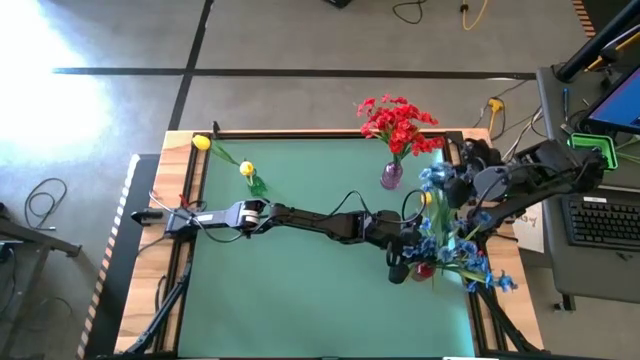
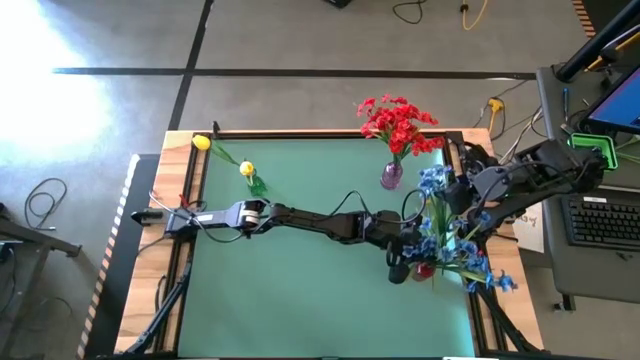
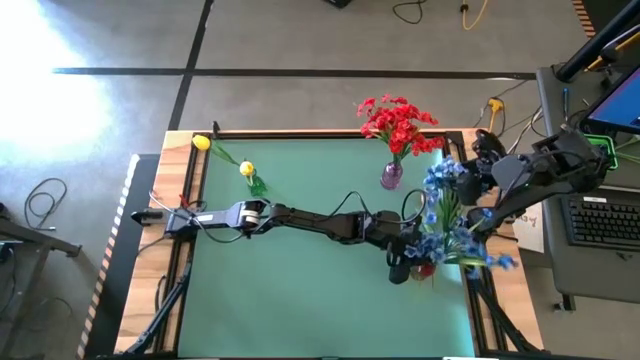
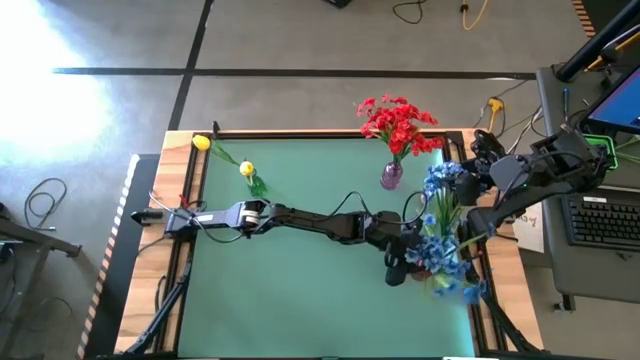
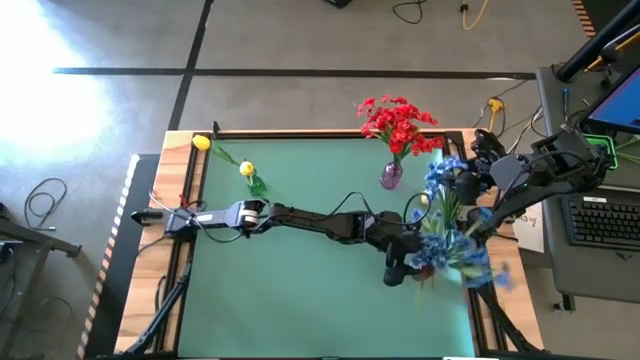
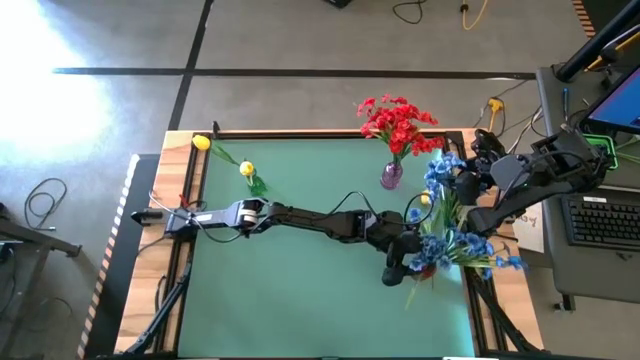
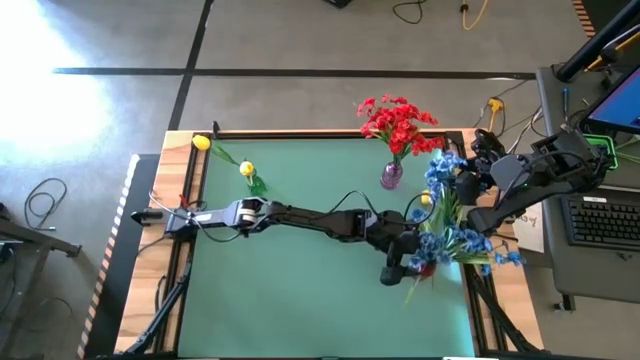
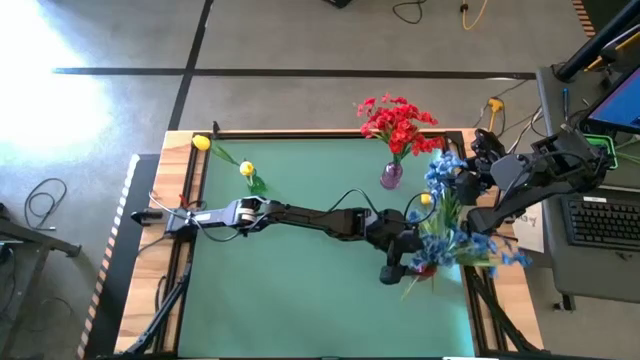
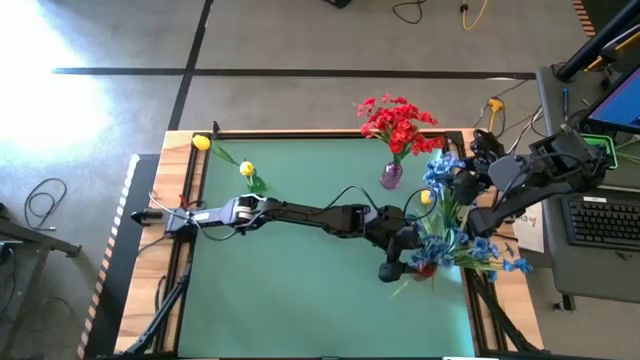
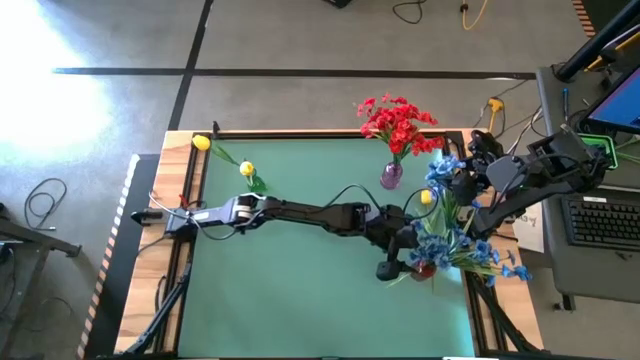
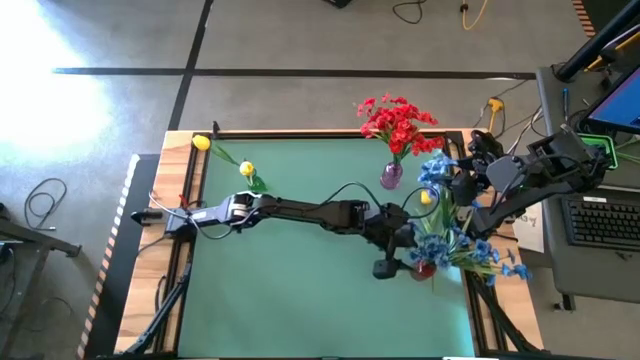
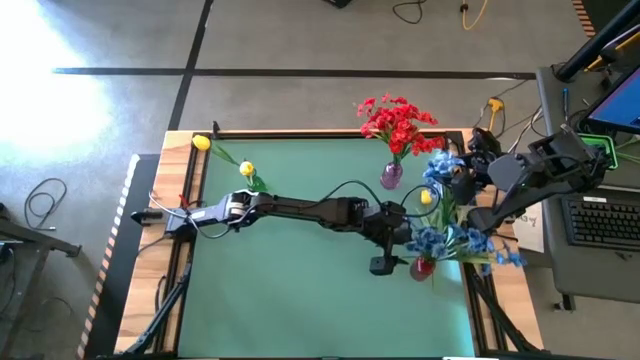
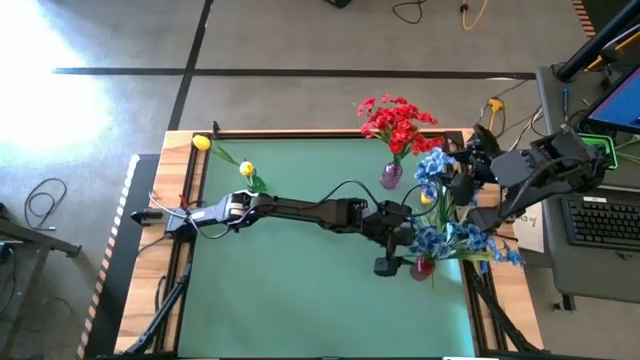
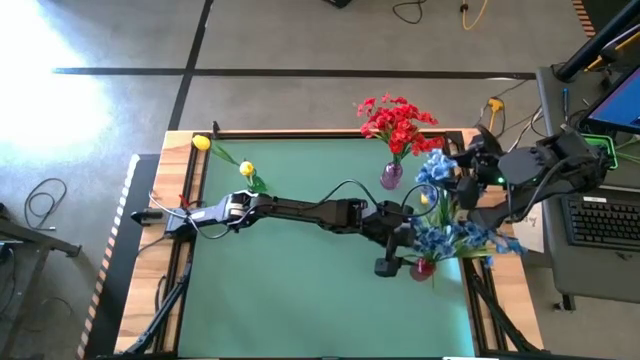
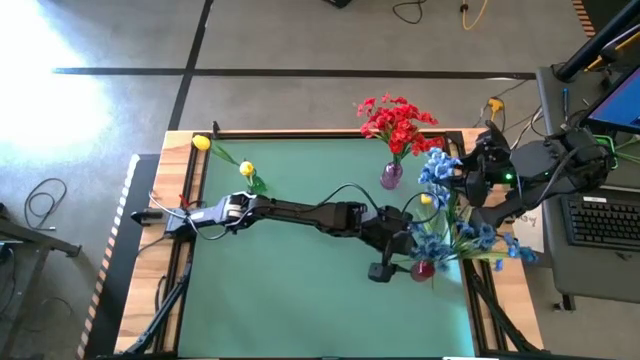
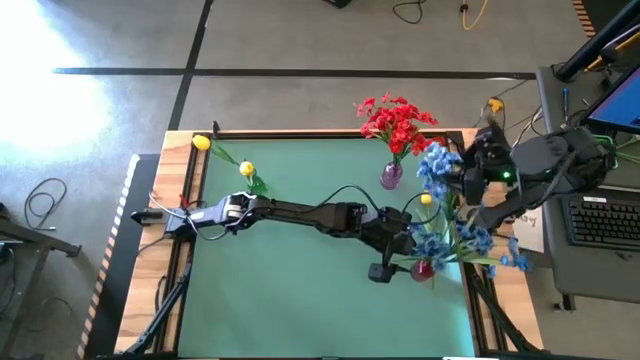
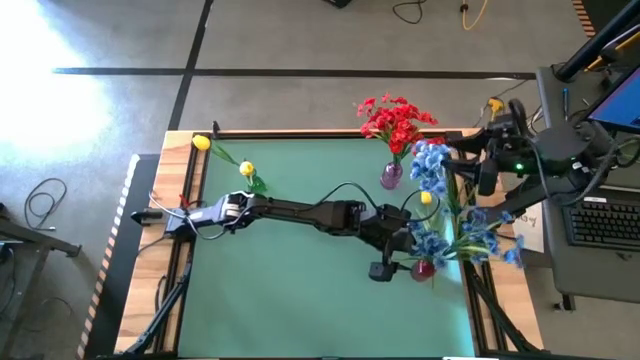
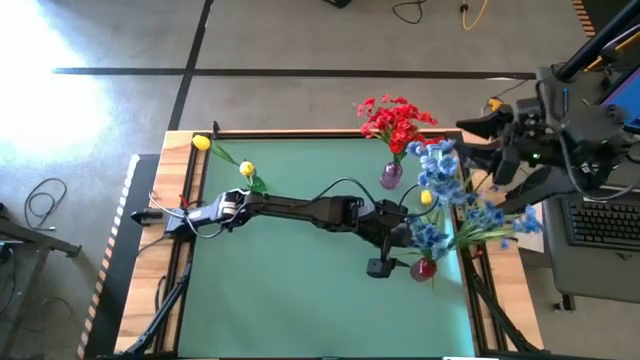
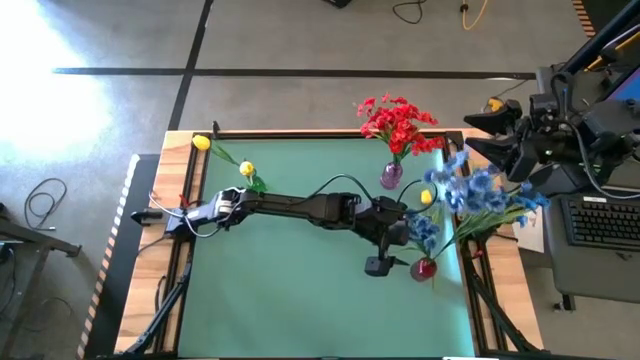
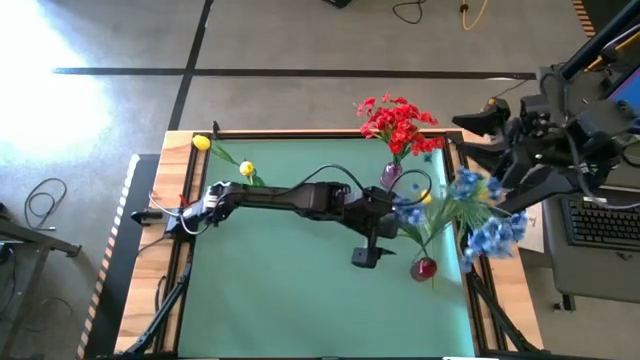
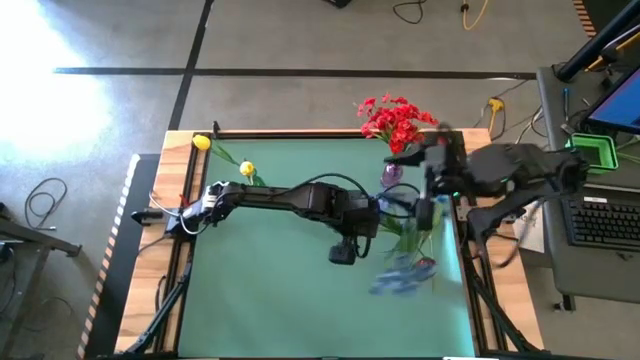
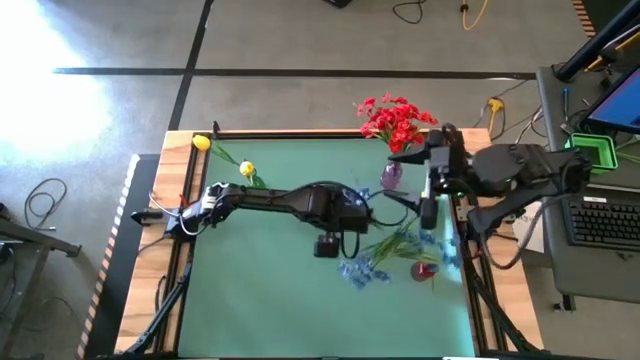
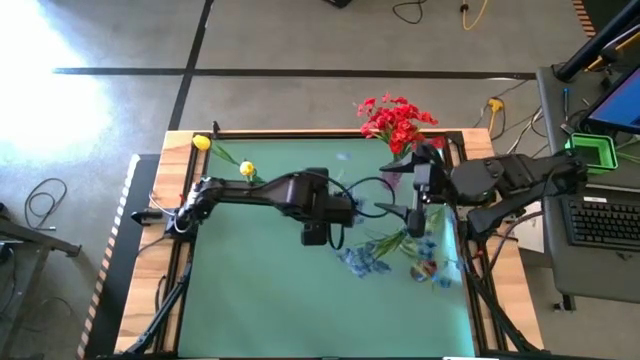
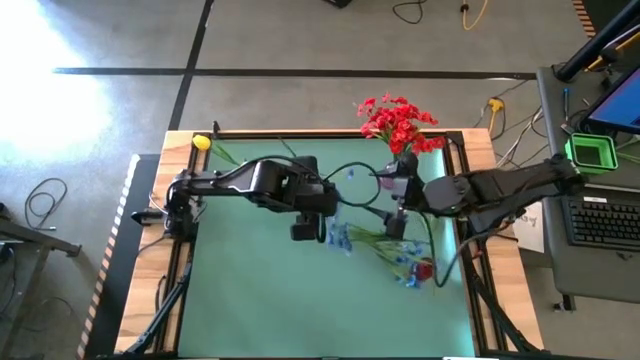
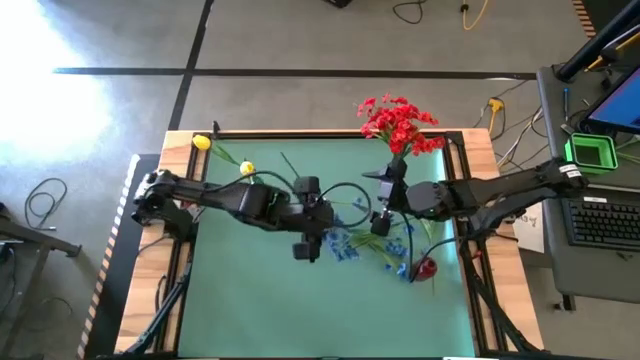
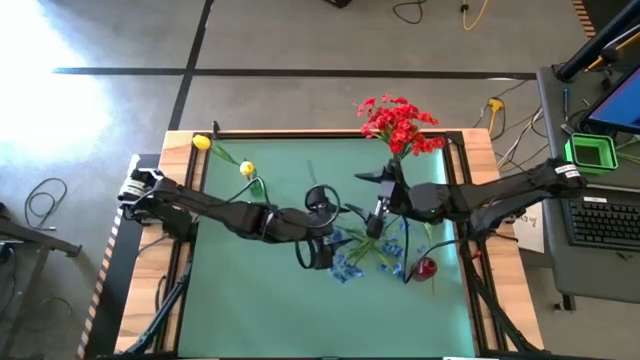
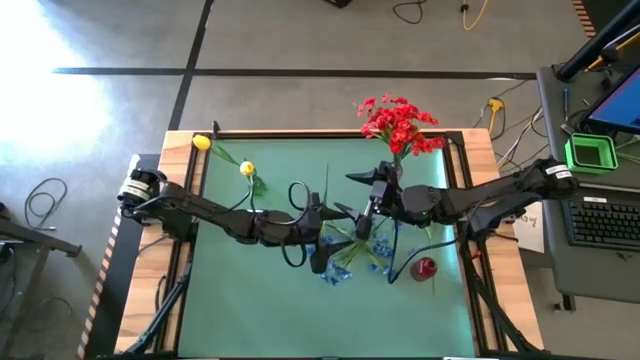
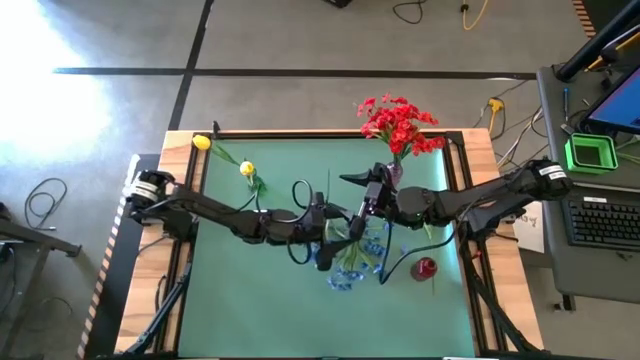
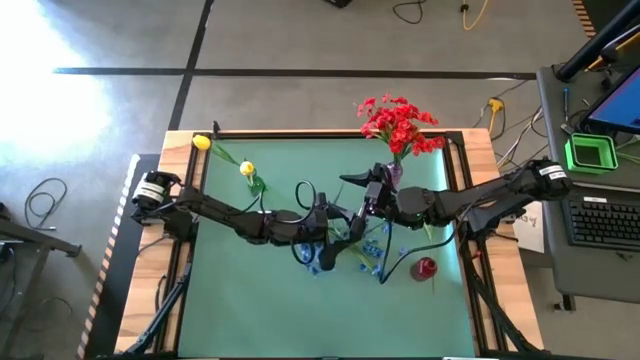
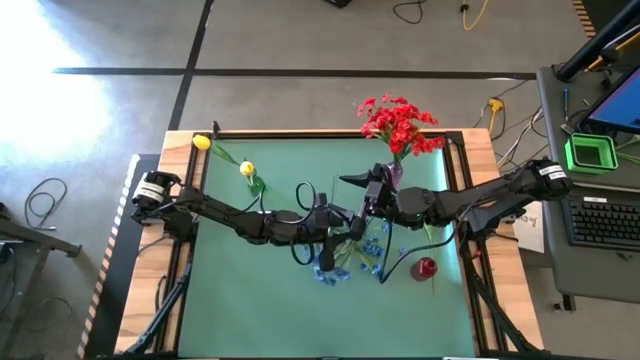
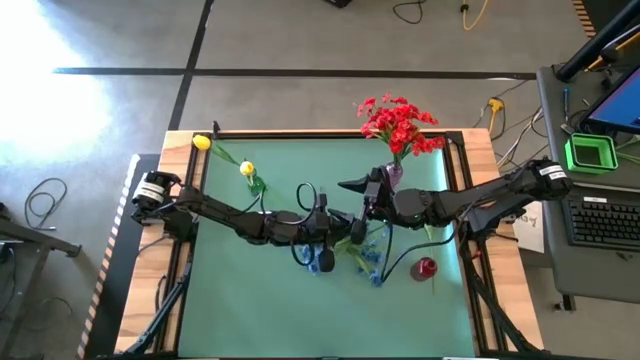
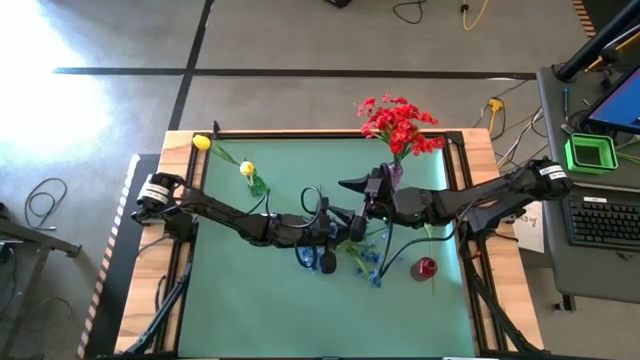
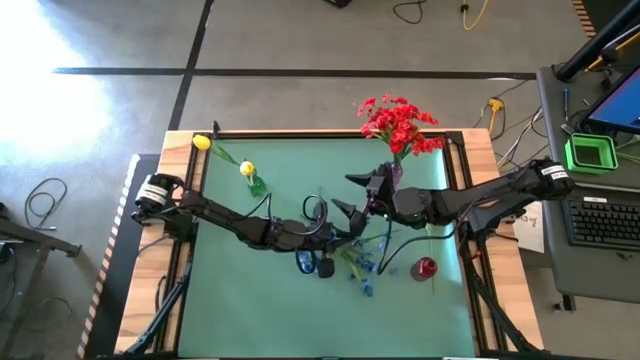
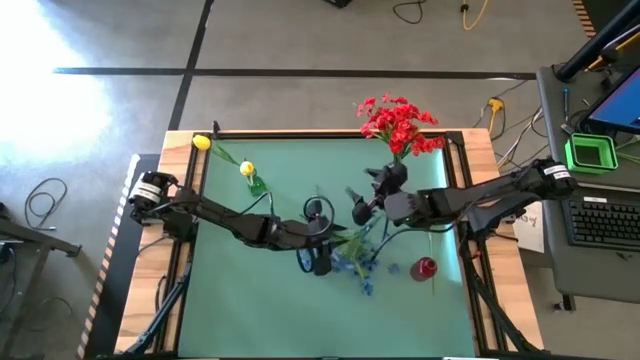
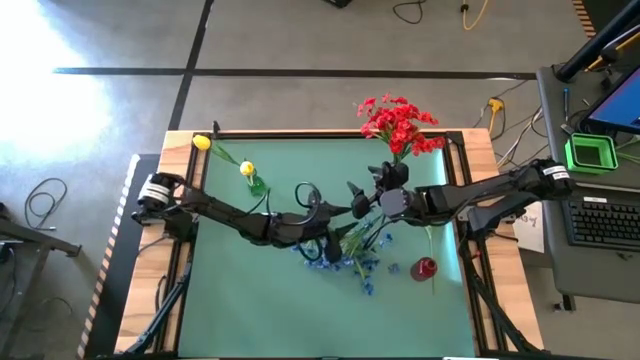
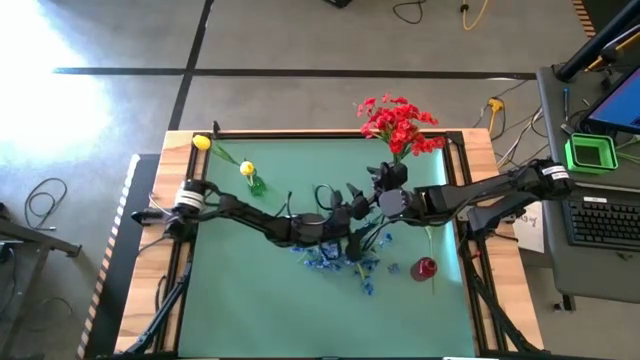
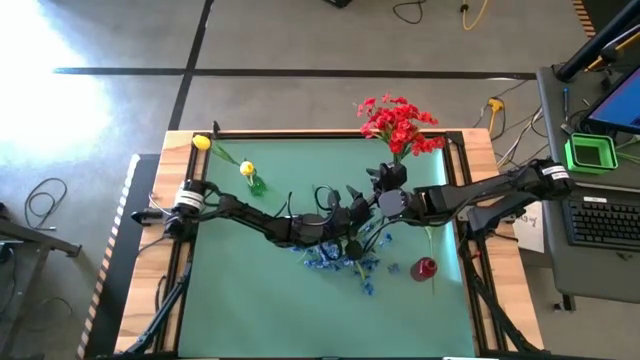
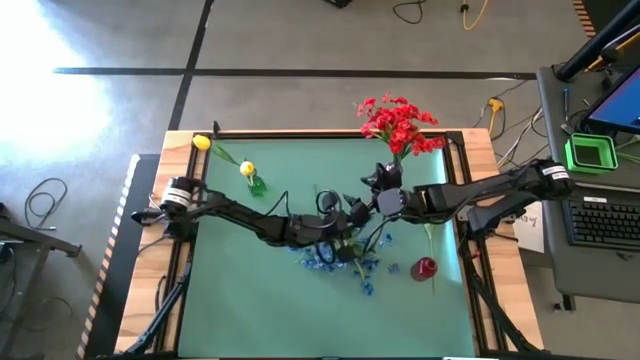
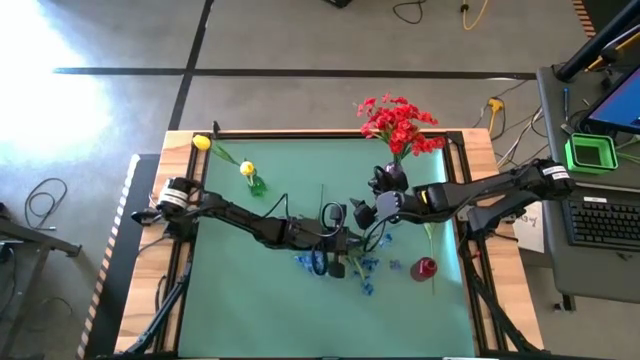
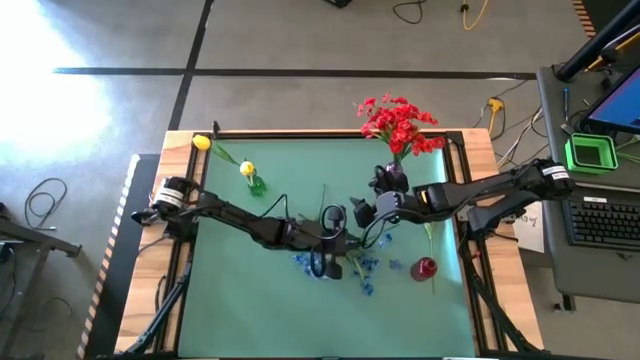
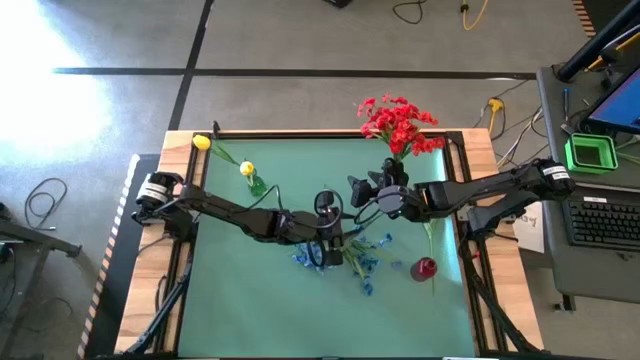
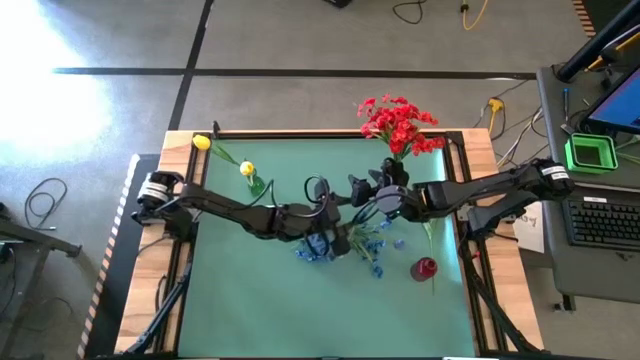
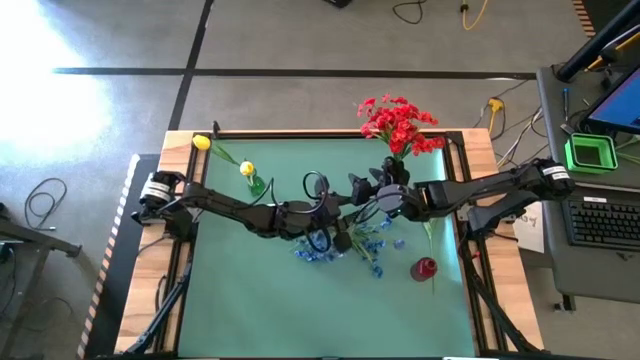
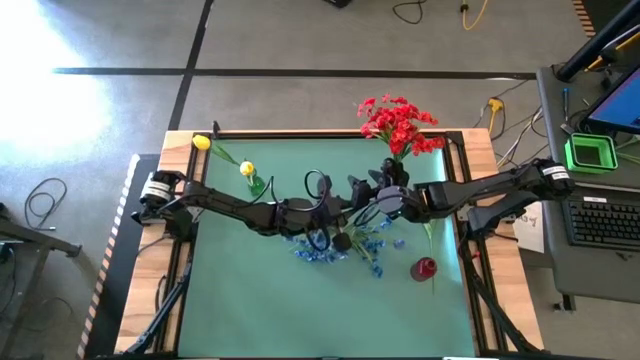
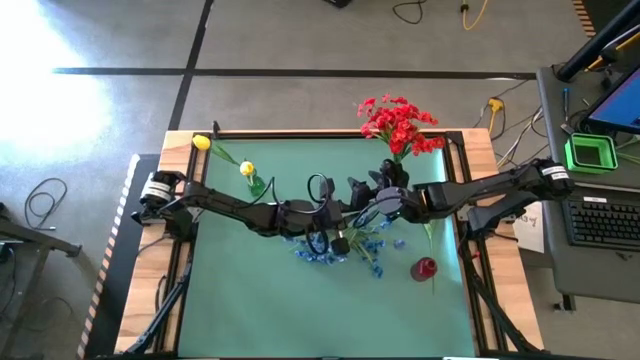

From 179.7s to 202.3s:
Task: Sort flowers into vase by color
Put the blue flower into the red vase
